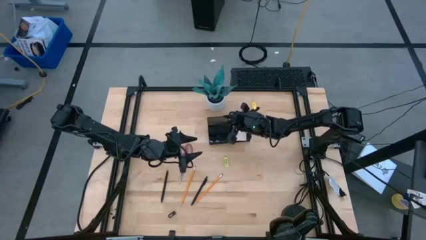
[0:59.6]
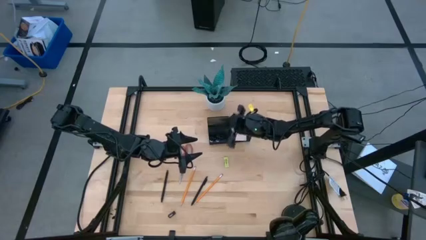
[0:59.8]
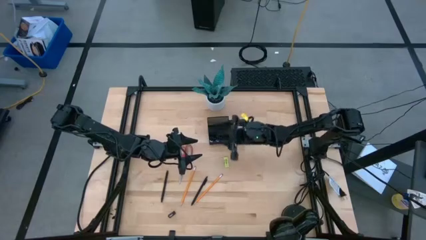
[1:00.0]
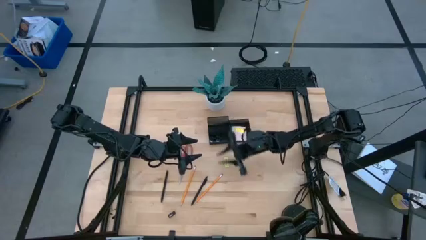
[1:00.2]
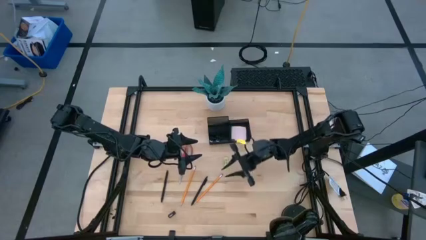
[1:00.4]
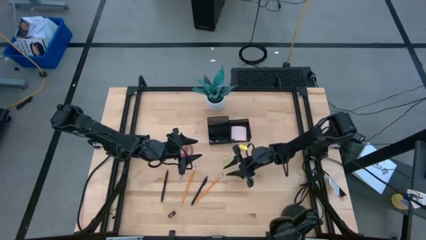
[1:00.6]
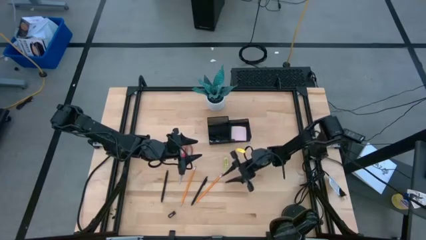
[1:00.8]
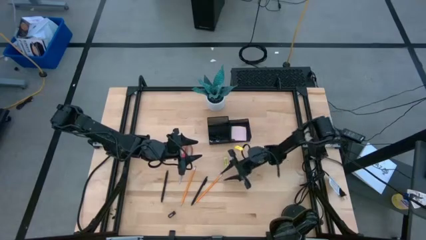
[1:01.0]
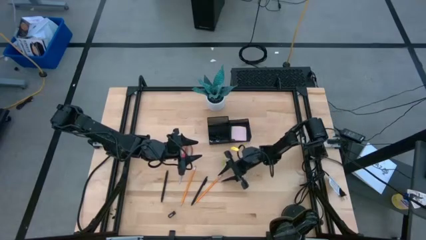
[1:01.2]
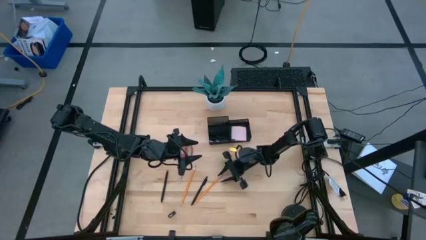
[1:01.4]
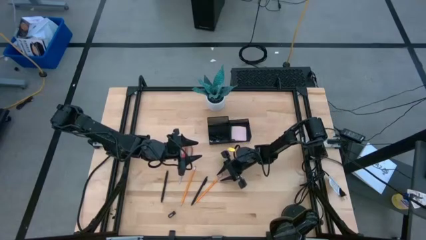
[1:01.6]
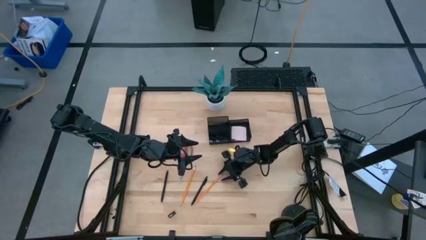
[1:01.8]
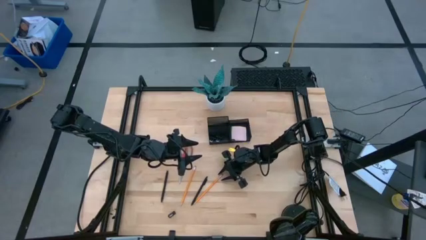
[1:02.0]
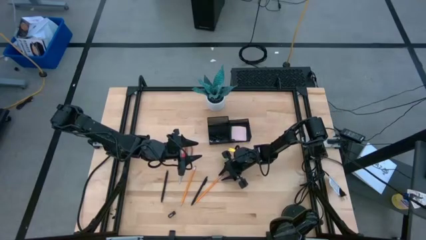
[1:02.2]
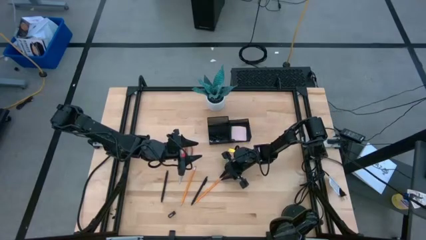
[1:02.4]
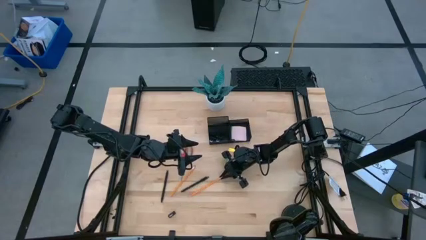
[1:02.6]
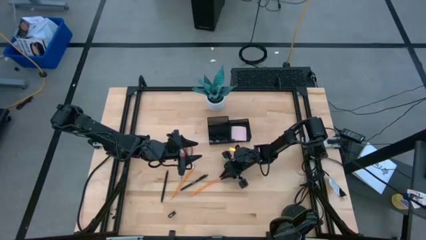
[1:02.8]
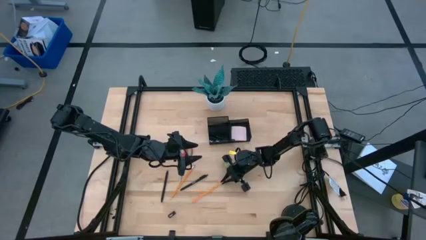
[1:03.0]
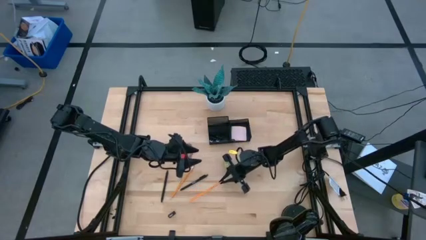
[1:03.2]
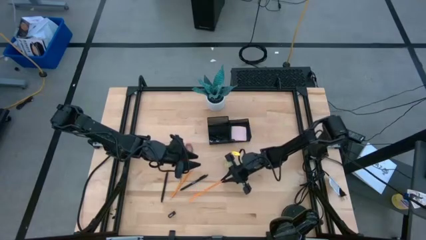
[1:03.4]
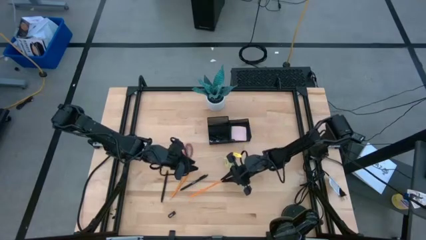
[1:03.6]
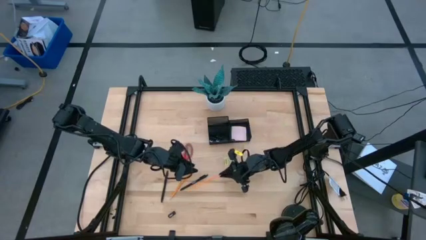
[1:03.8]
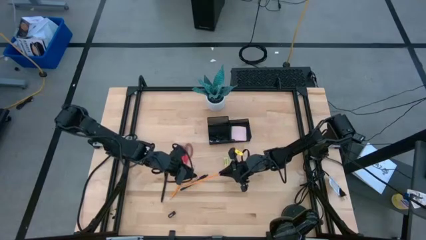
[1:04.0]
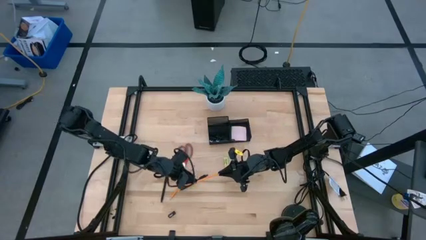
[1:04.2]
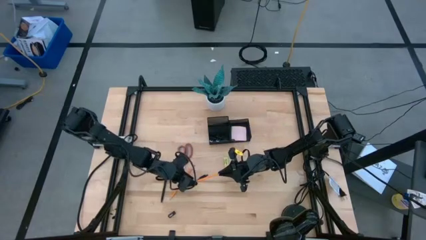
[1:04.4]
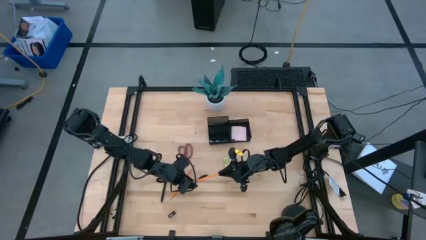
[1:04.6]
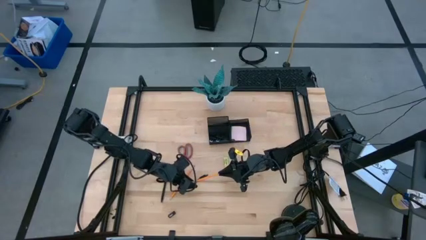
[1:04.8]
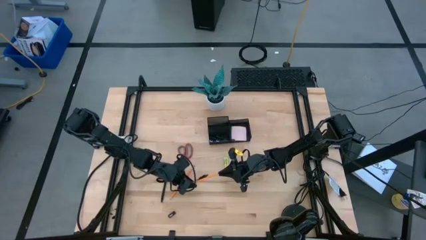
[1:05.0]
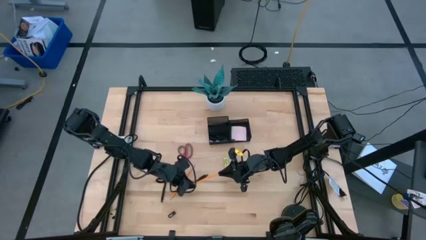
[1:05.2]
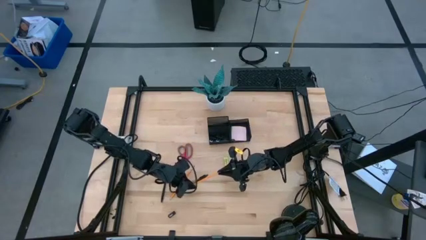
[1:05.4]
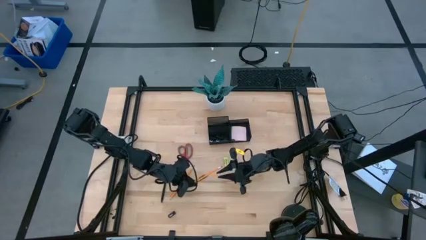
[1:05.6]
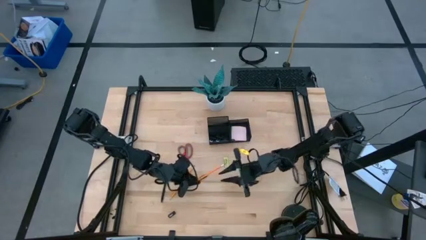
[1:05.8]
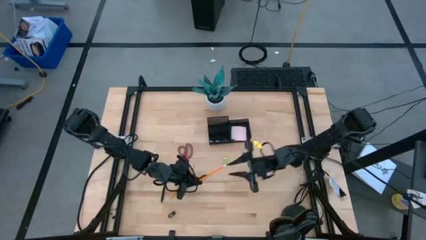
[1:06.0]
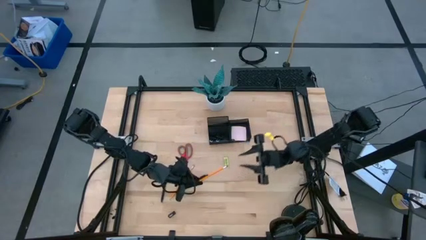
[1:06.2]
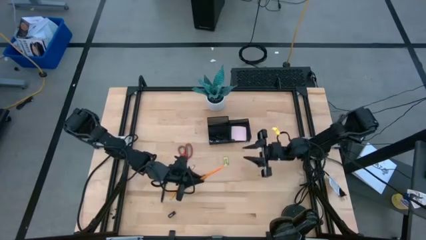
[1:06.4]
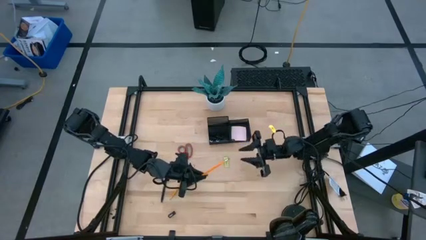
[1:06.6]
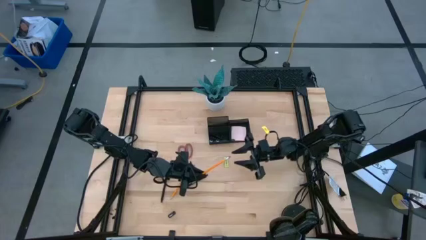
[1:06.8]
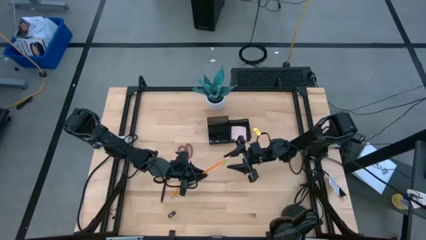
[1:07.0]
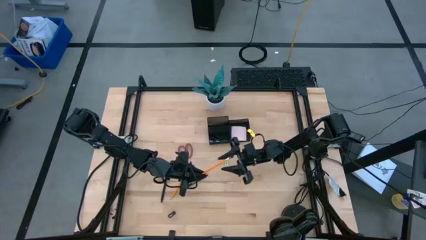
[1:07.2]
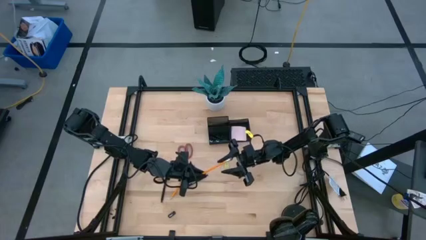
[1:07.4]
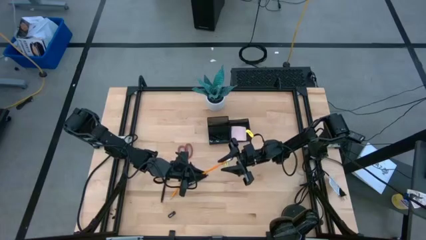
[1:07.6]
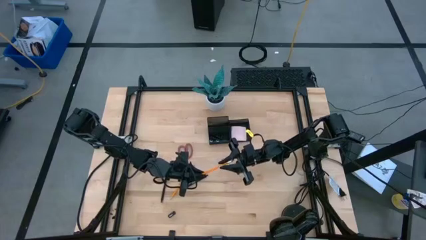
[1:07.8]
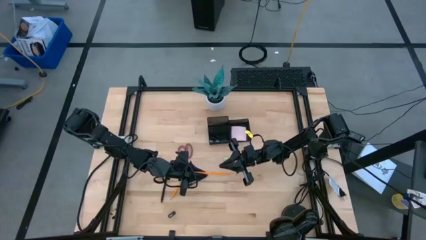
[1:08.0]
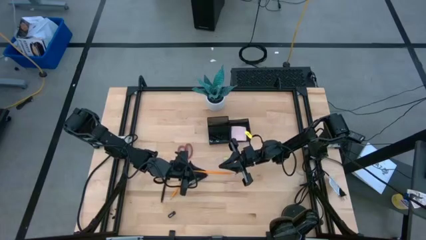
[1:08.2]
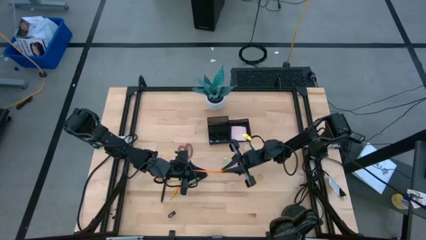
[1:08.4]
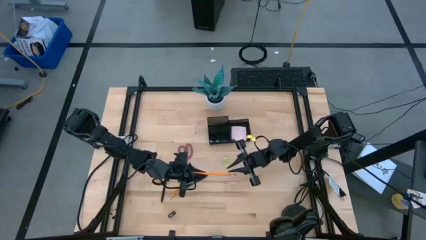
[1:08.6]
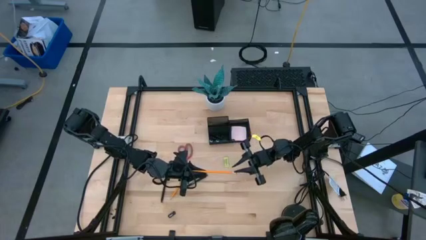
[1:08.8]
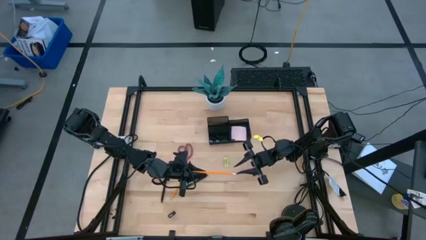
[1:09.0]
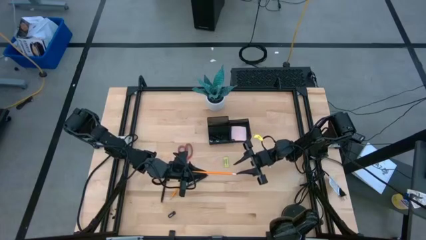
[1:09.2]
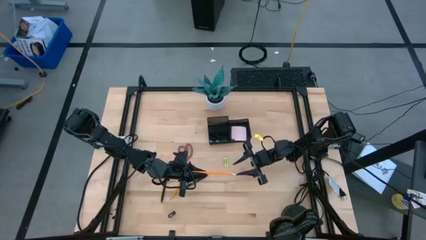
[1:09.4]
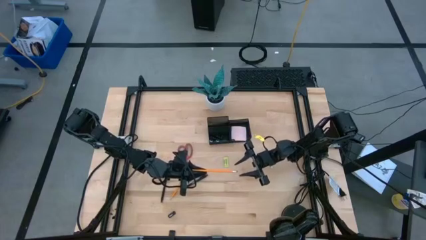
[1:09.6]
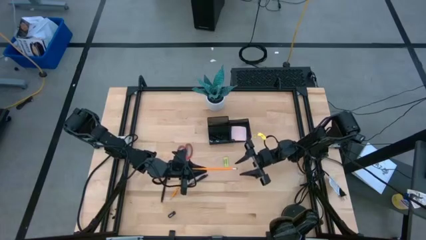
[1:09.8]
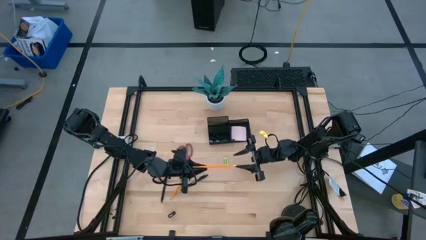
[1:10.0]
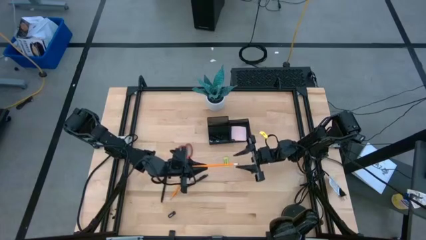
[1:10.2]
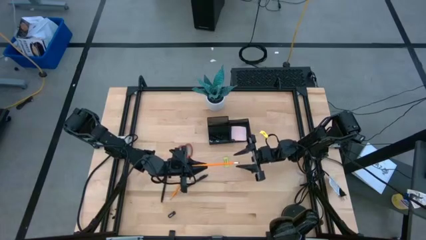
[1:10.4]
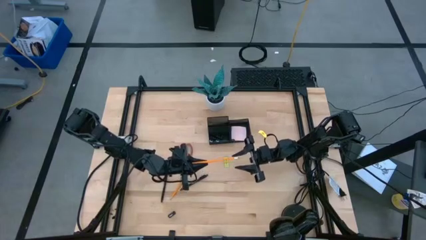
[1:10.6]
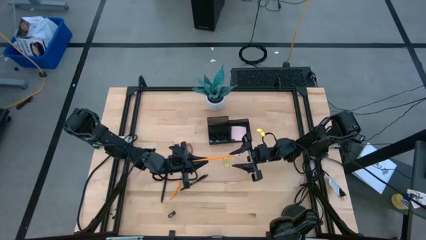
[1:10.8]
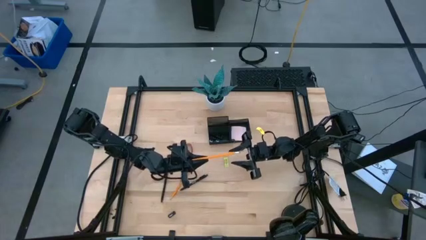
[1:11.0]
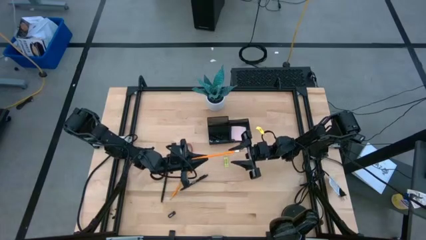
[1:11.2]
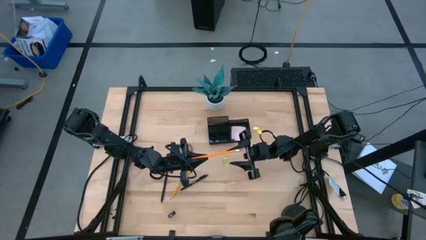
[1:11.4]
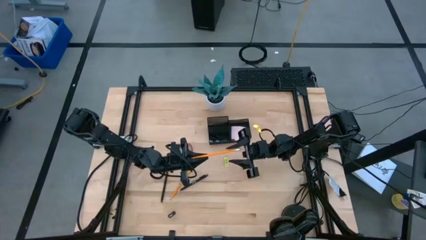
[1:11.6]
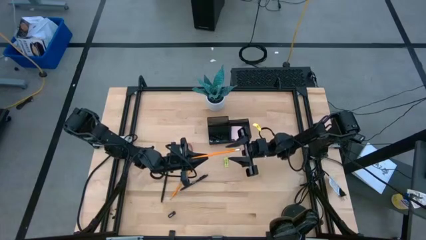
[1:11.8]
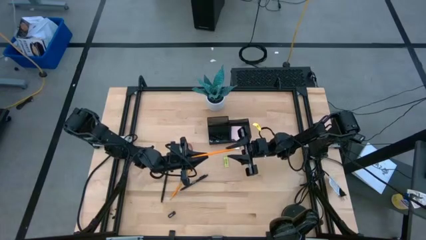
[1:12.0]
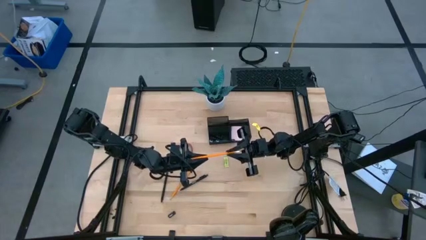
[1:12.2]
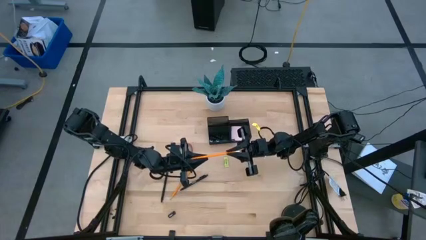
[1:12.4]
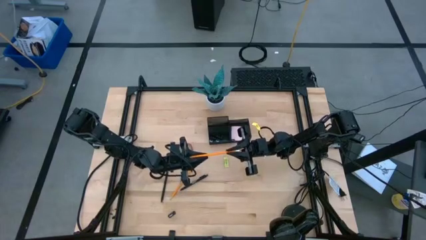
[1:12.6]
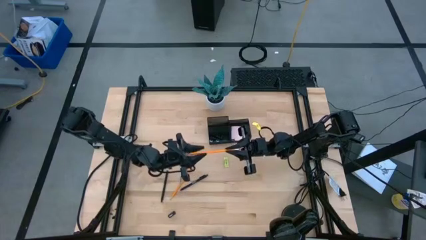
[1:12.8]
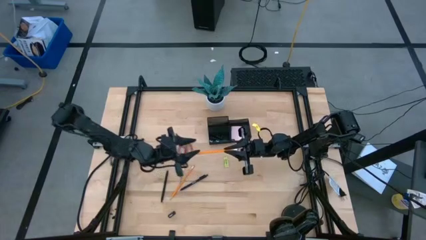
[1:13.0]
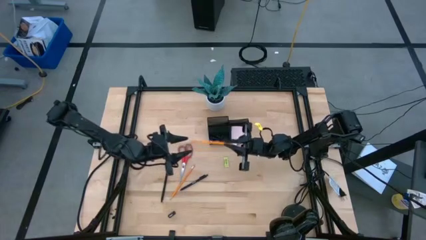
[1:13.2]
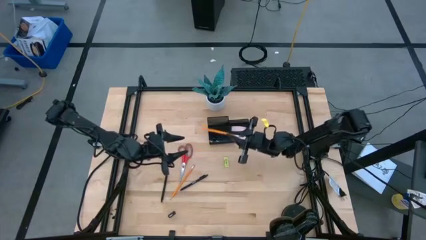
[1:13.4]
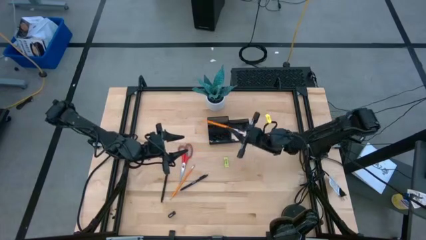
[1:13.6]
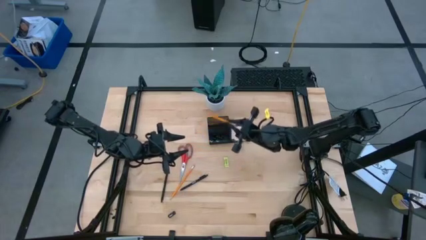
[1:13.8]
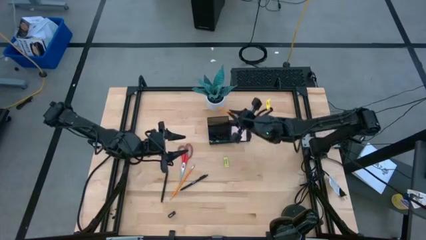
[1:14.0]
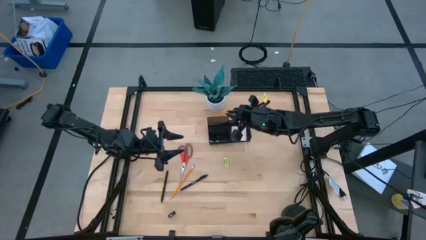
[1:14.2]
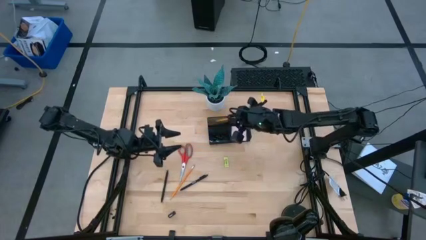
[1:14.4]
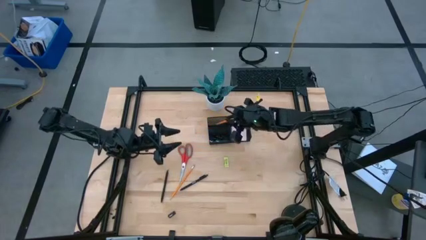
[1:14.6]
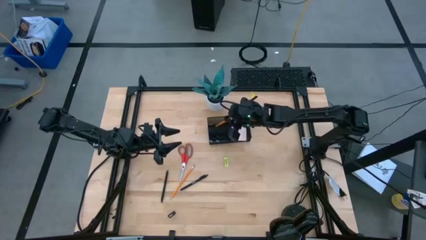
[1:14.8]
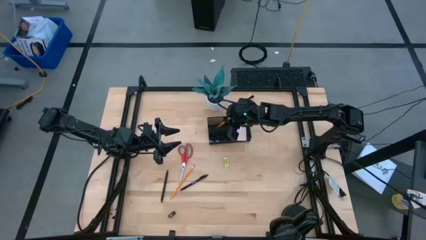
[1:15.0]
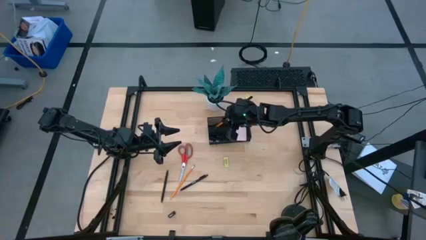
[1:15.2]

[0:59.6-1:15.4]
Task: Pick and place office supplies into organizer
Put the orange pencil into the black desk organizer
